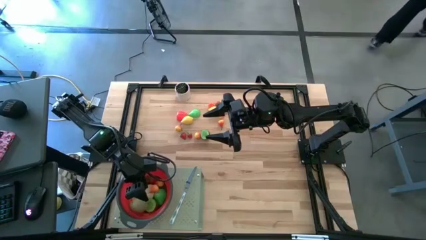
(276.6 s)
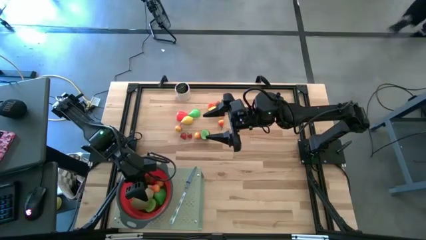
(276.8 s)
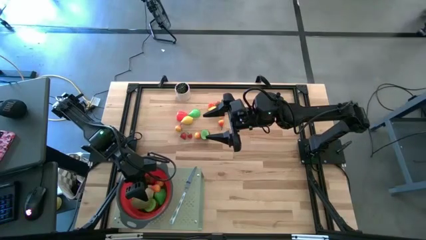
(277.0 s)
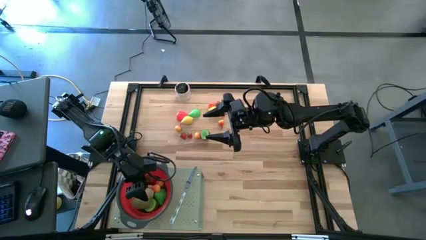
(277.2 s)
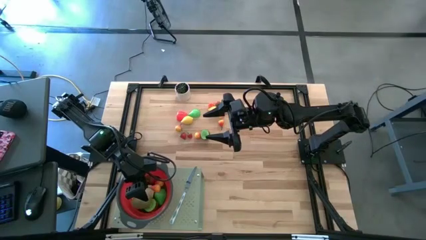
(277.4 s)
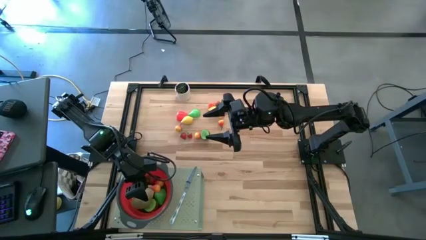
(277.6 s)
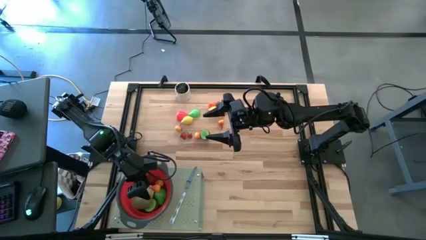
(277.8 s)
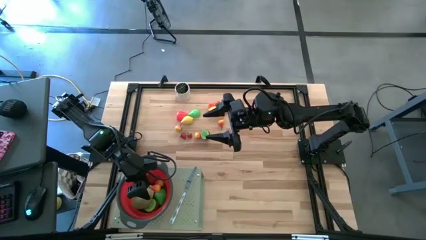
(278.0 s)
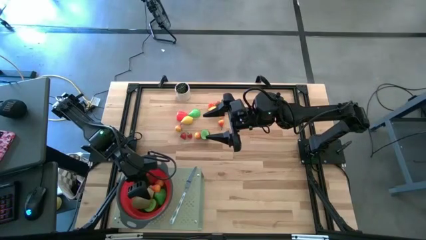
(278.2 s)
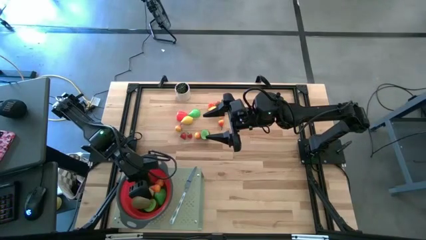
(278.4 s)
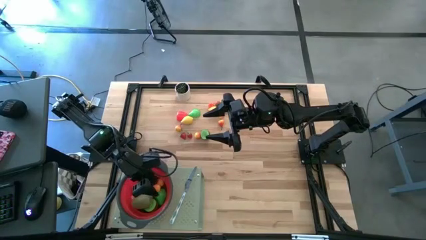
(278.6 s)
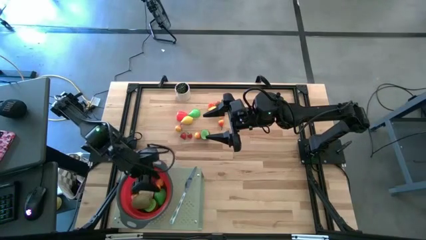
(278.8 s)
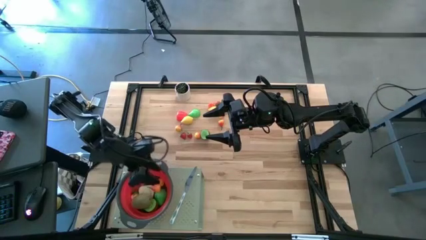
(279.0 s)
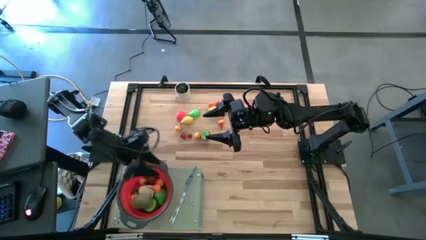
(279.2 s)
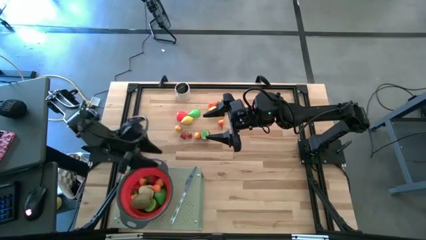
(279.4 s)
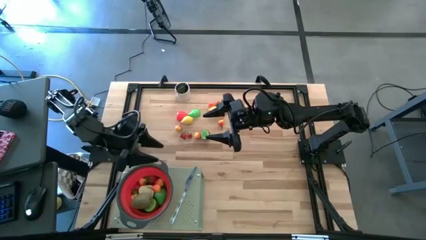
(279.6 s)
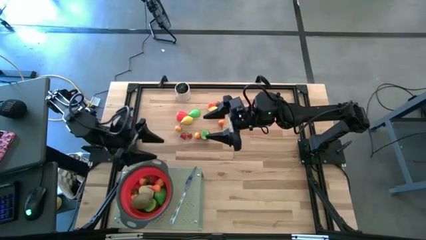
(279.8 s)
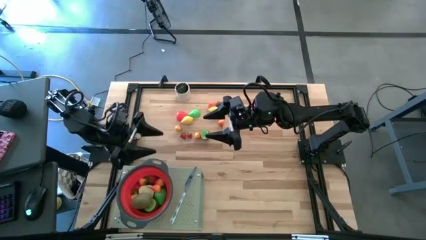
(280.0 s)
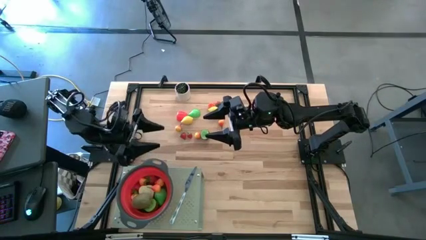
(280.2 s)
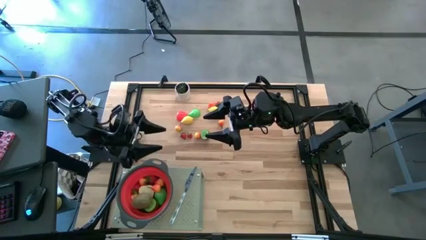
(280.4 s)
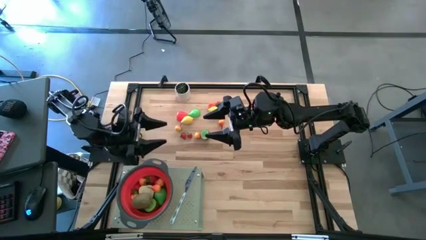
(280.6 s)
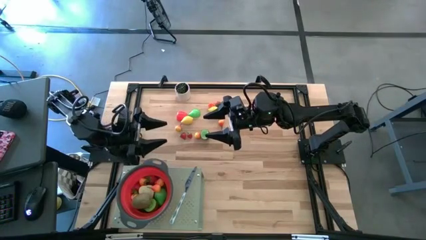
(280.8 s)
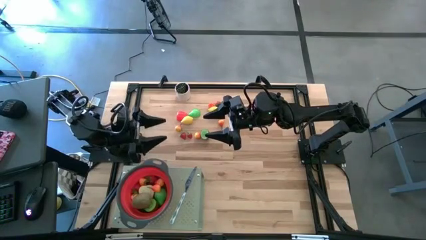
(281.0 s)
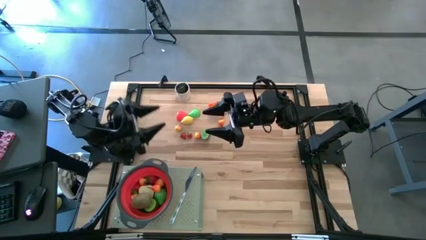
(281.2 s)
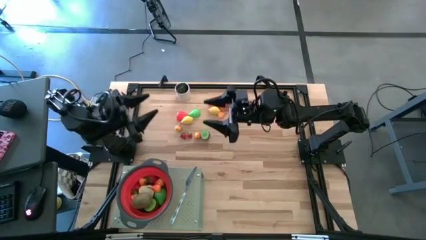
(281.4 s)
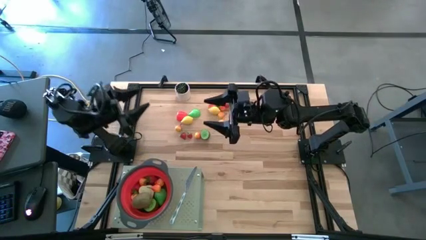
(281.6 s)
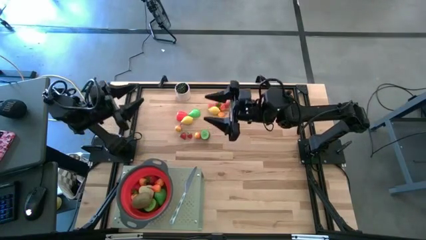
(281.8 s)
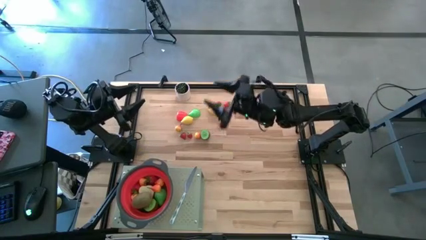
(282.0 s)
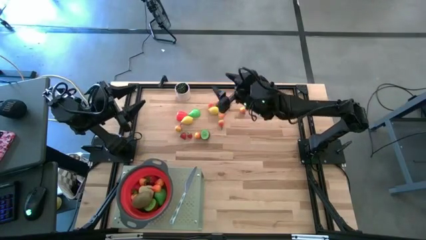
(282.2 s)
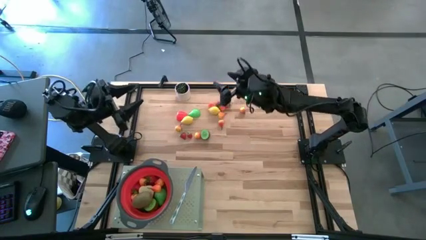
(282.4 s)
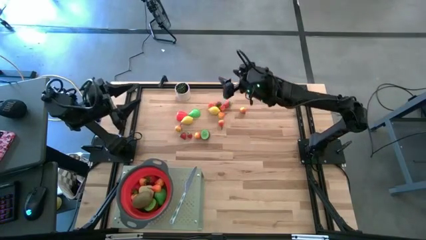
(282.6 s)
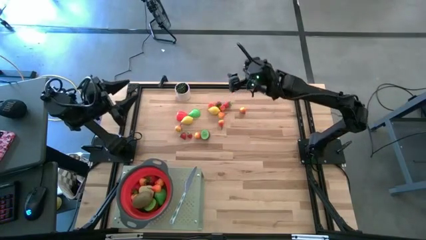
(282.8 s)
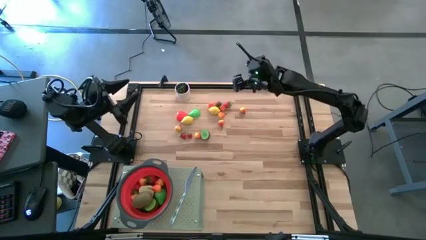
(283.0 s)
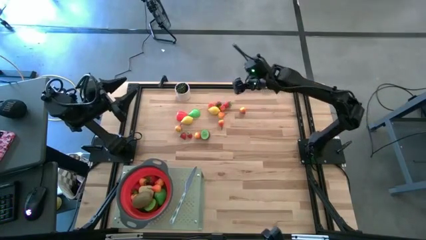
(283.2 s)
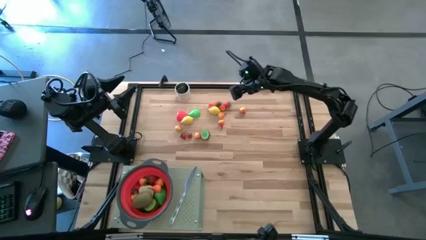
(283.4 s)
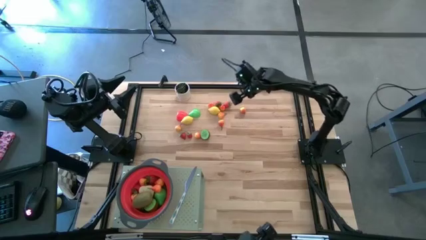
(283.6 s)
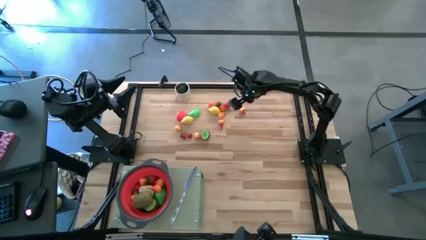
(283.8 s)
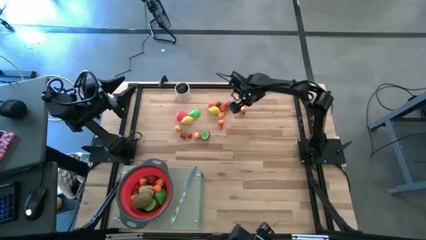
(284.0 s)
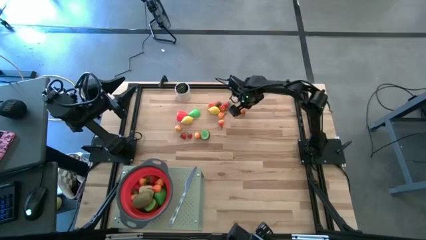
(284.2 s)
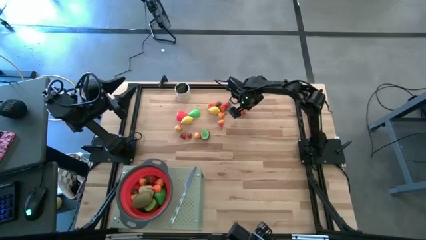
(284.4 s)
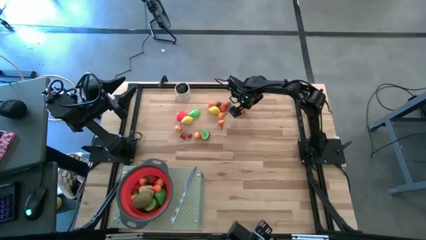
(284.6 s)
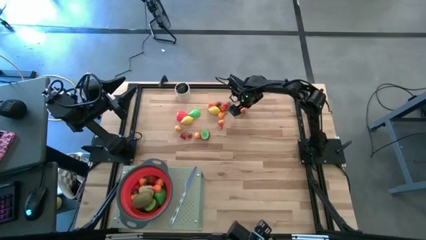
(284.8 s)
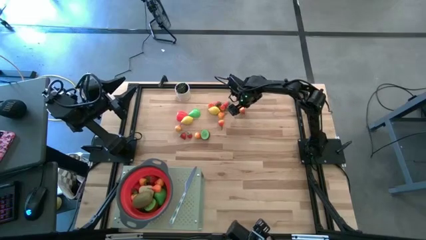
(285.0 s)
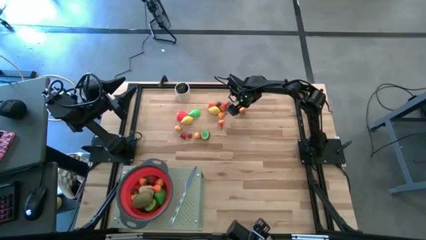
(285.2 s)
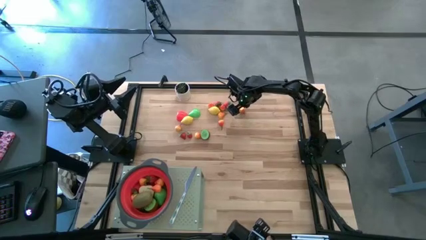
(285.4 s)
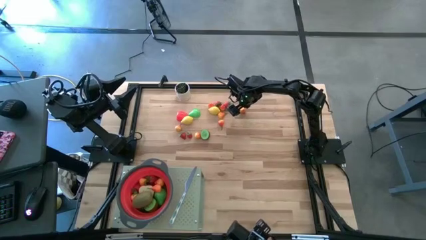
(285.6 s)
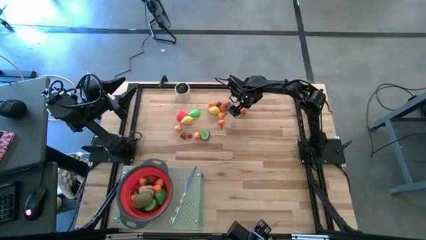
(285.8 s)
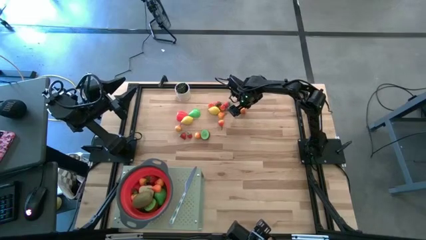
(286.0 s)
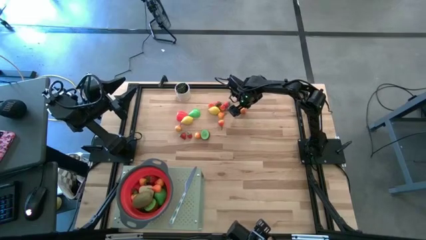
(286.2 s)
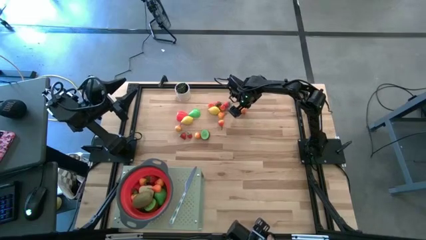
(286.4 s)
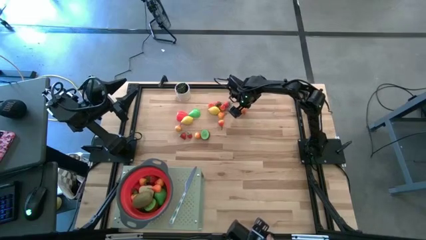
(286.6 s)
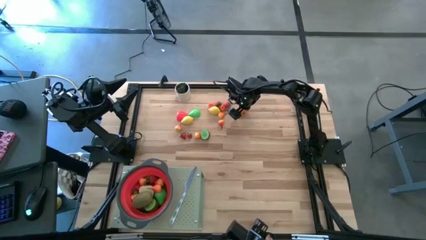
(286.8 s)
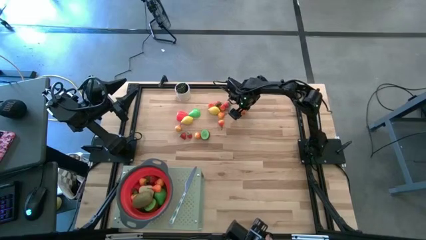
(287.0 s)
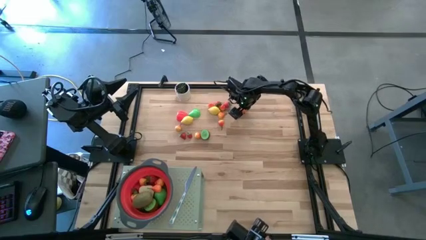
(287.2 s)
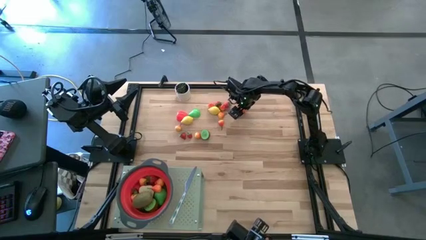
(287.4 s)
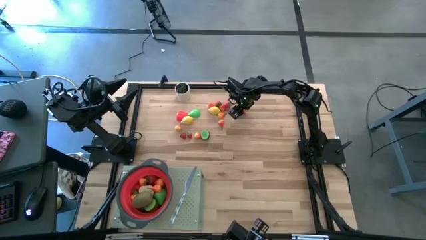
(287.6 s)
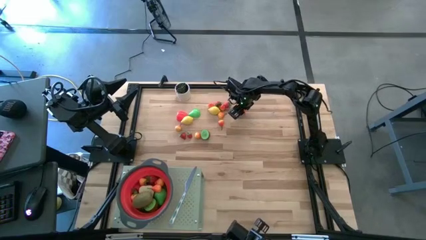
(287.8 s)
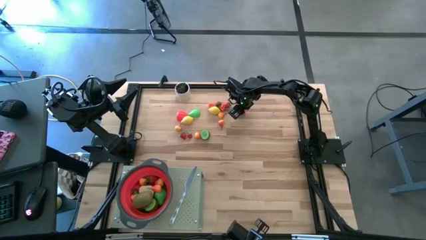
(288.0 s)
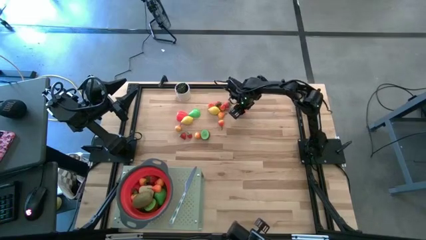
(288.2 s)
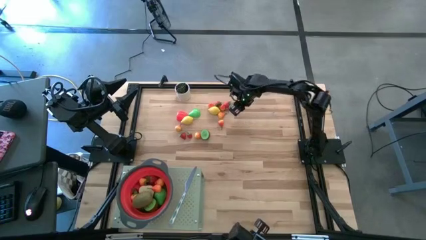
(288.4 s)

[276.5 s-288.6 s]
Task: Pick & Place Fruit
Put the pear into the red strainer bowl on the shelf

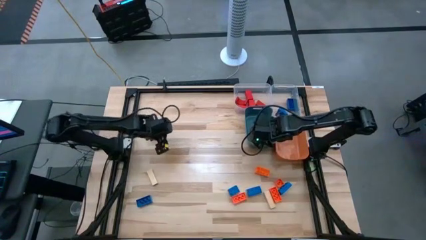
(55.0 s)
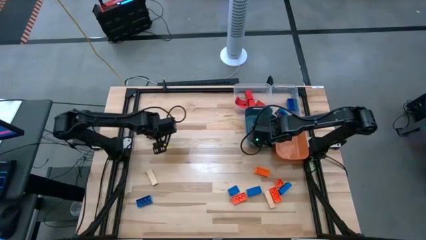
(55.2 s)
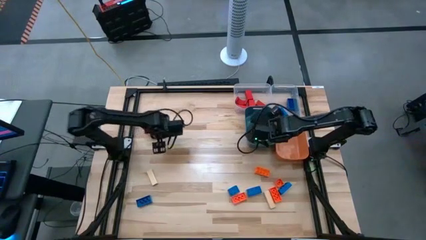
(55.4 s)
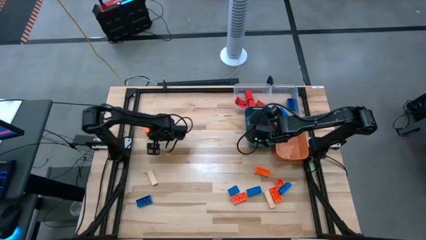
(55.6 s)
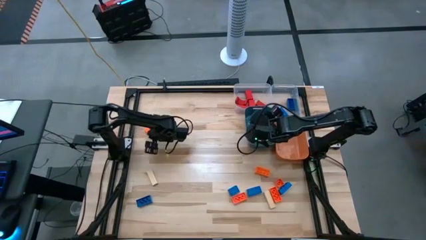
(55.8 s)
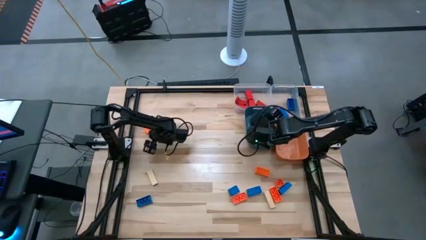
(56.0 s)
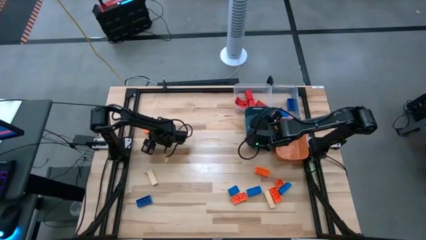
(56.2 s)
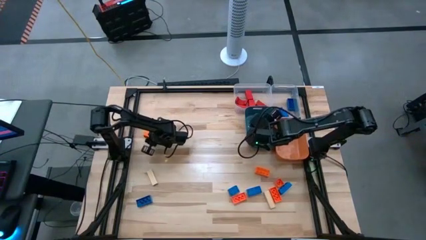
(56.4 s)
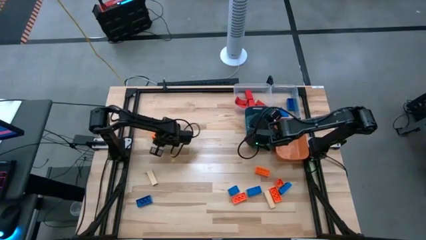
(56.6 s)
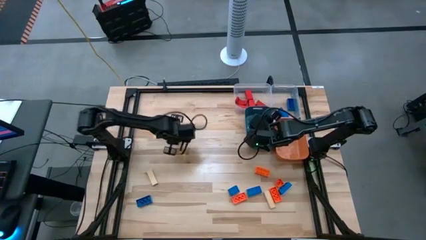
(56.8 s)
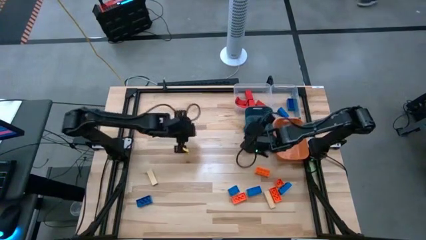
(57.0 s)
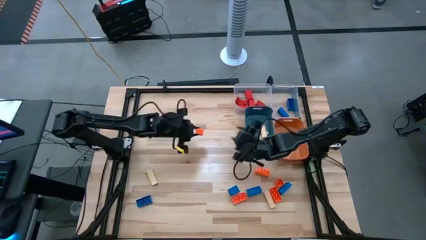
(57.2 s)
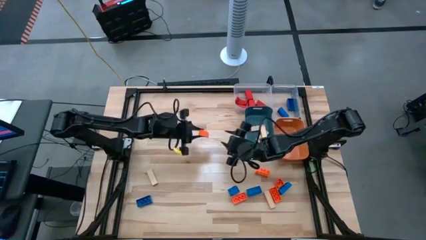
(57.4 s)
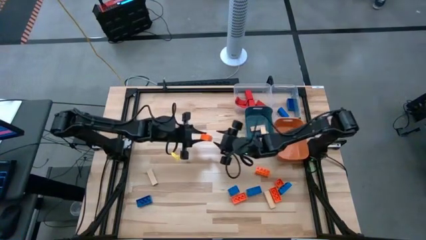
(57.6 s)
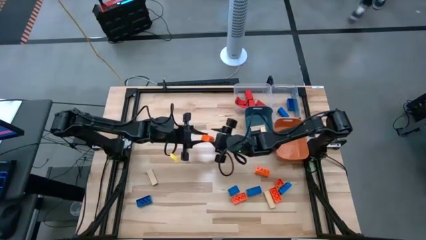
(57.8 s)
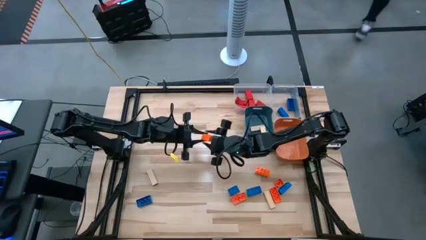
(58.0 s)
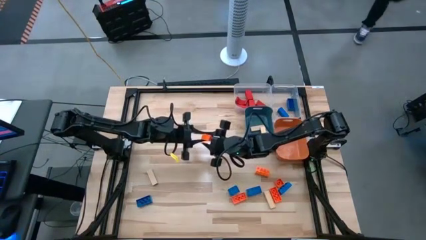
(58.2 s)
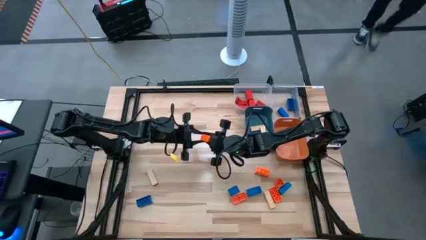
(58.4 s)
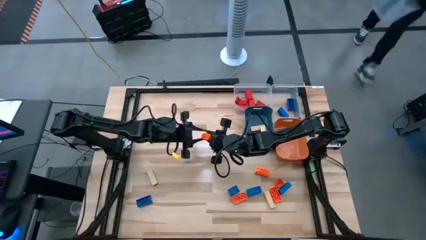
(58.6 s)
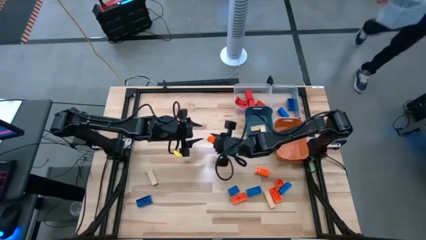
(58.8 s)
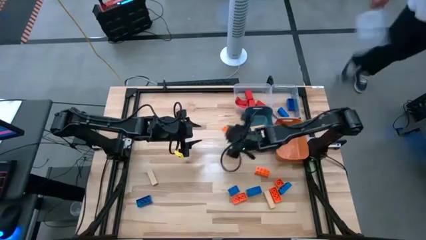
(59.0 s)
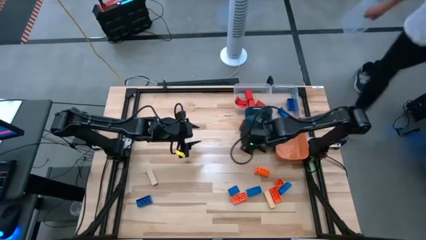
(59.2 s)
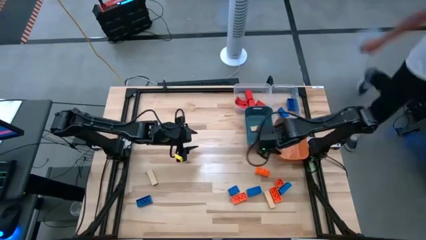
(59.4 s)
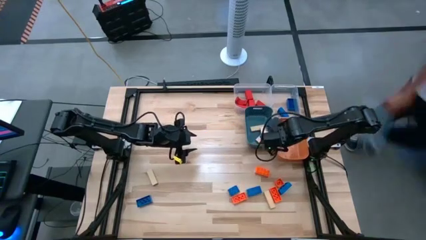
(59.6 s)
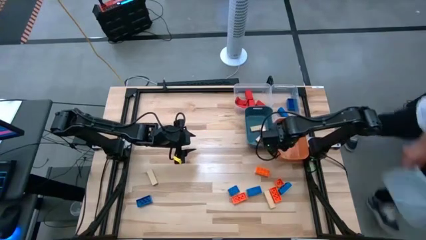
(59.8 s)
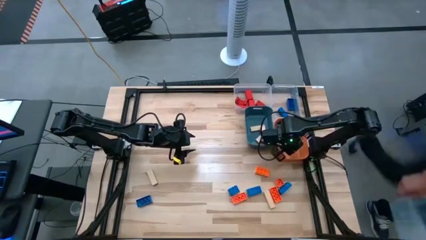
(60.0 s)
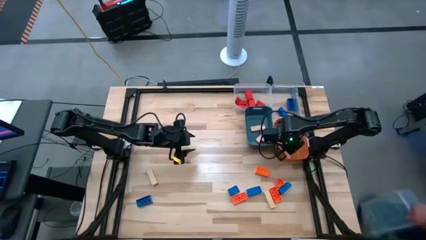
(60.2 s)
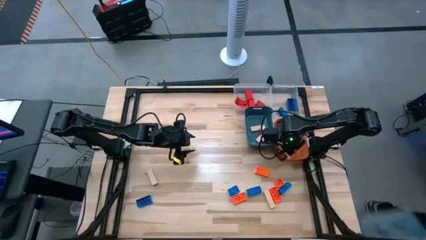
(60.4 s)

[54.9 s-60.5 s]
Task: Sort blocks
Put the 8 stud orange game piece into the orange bin
